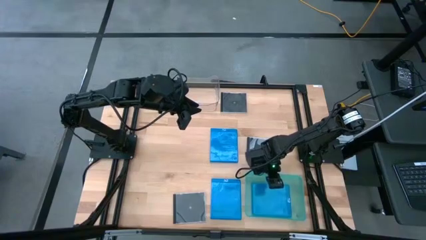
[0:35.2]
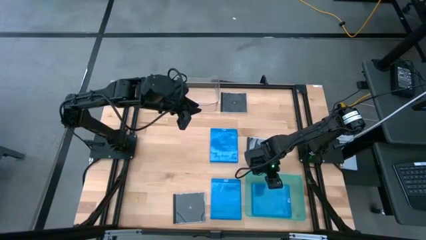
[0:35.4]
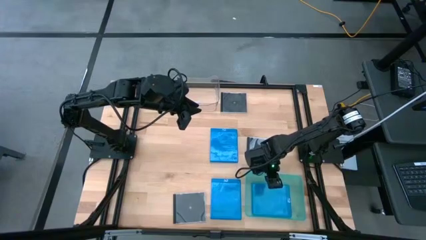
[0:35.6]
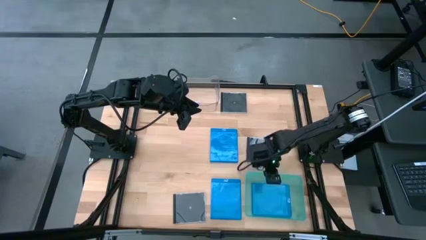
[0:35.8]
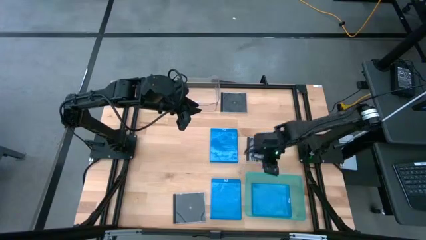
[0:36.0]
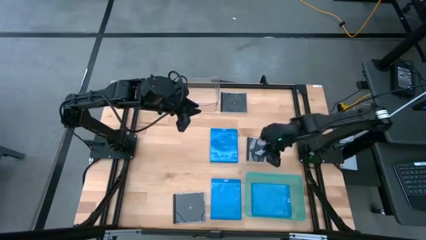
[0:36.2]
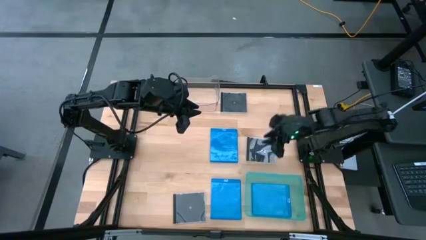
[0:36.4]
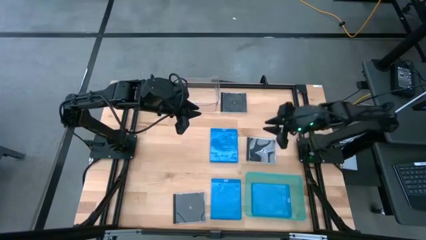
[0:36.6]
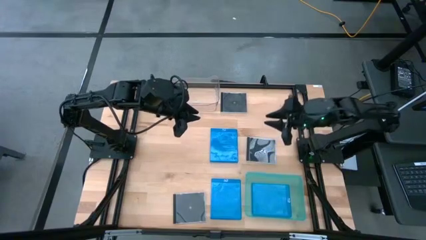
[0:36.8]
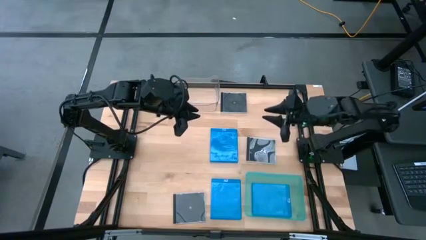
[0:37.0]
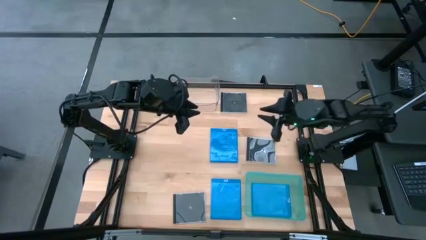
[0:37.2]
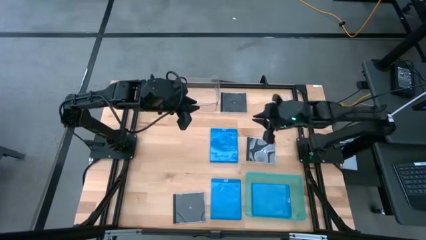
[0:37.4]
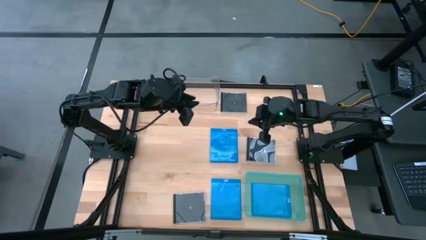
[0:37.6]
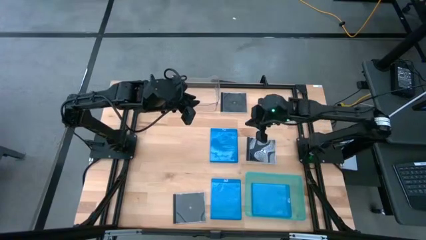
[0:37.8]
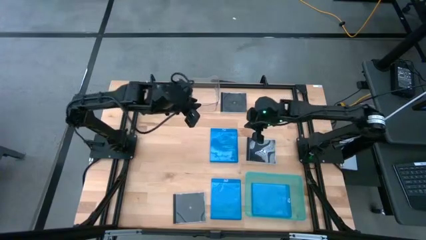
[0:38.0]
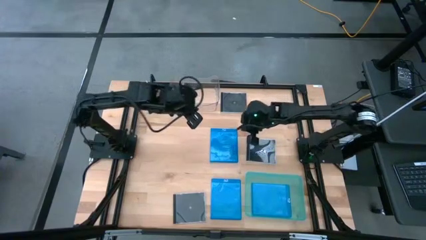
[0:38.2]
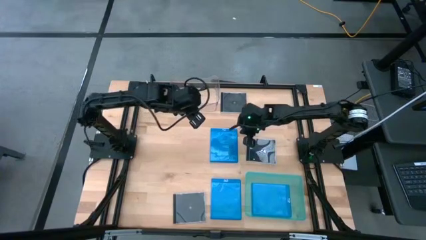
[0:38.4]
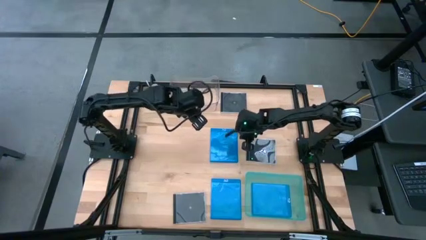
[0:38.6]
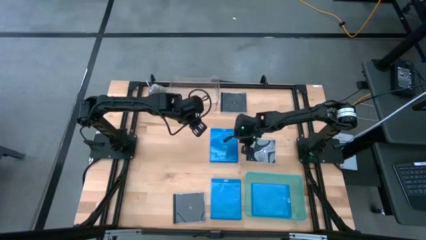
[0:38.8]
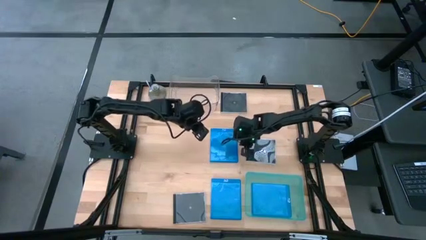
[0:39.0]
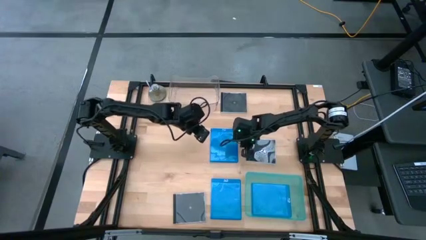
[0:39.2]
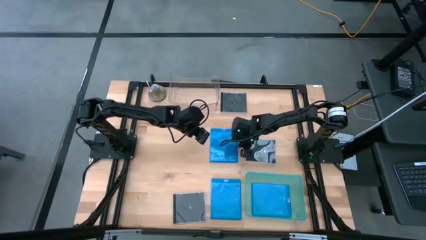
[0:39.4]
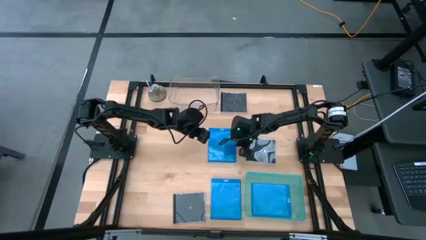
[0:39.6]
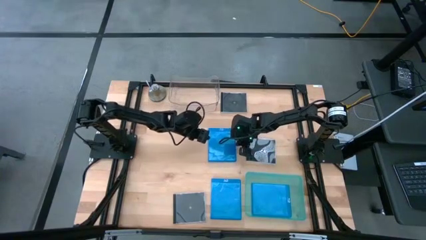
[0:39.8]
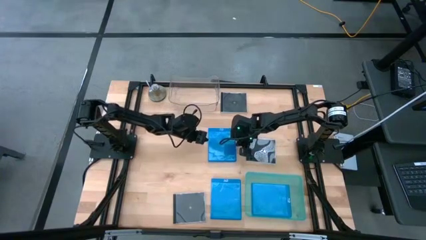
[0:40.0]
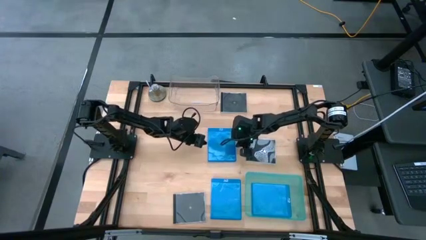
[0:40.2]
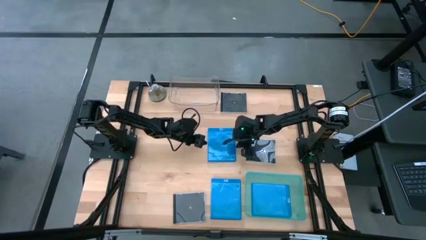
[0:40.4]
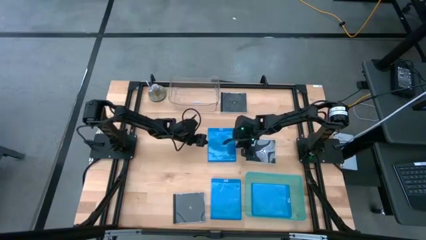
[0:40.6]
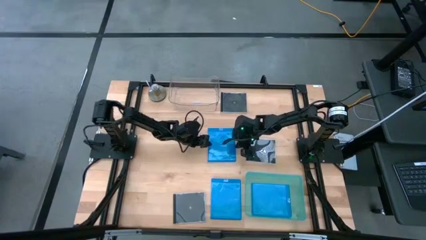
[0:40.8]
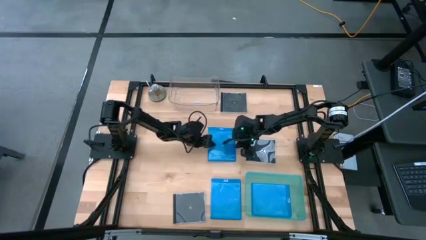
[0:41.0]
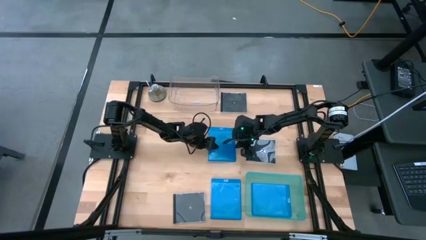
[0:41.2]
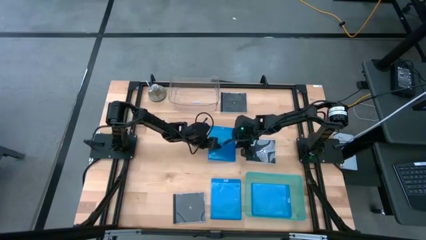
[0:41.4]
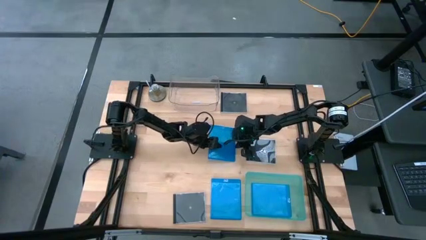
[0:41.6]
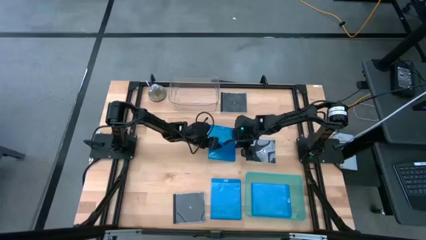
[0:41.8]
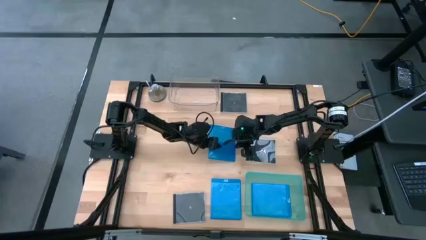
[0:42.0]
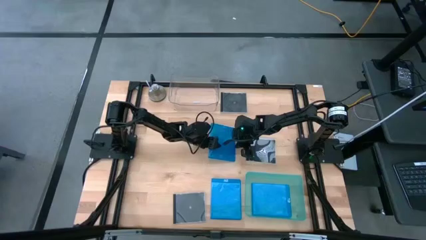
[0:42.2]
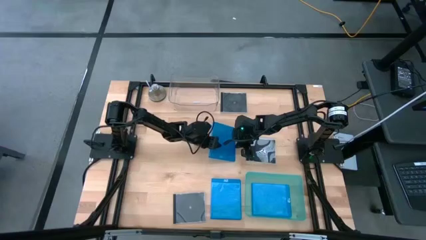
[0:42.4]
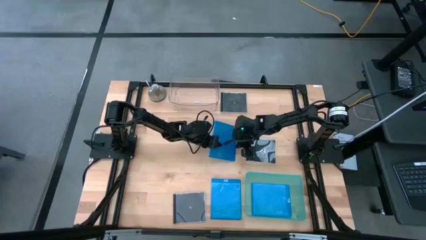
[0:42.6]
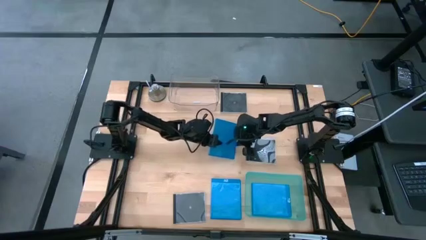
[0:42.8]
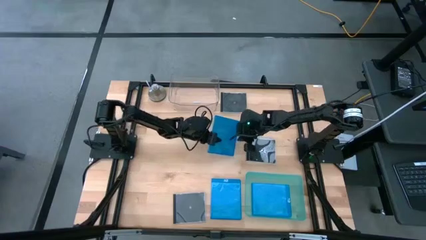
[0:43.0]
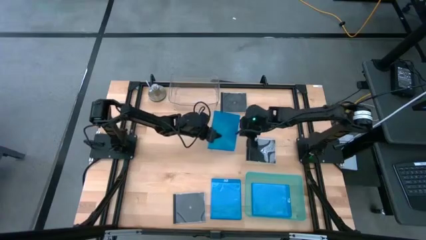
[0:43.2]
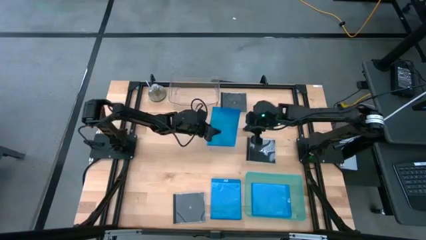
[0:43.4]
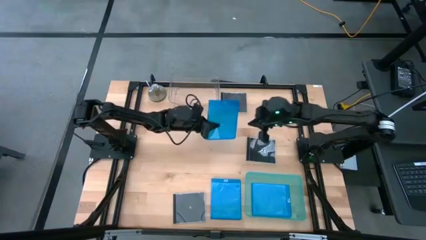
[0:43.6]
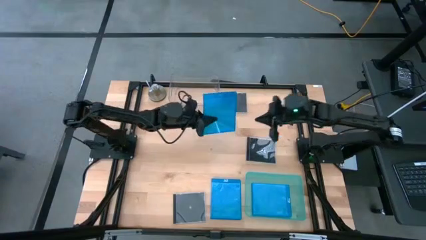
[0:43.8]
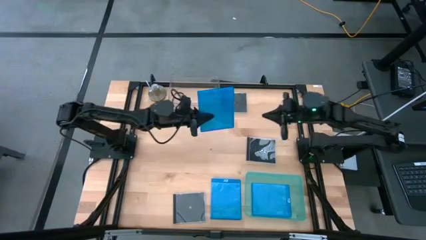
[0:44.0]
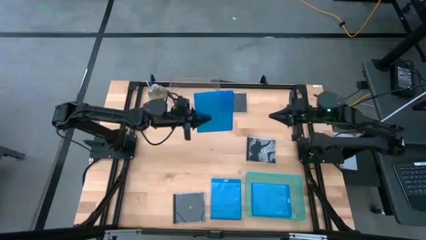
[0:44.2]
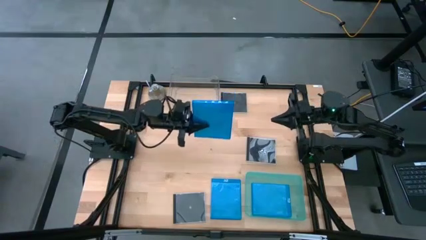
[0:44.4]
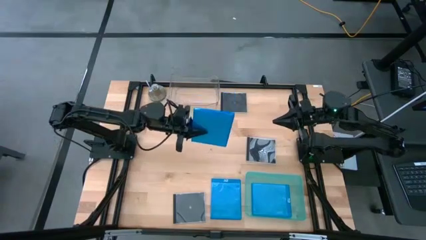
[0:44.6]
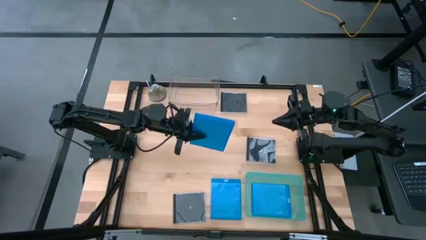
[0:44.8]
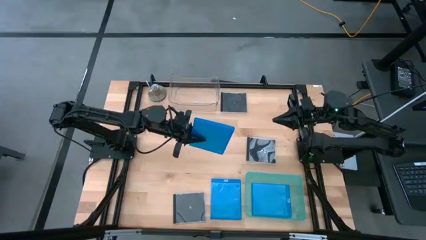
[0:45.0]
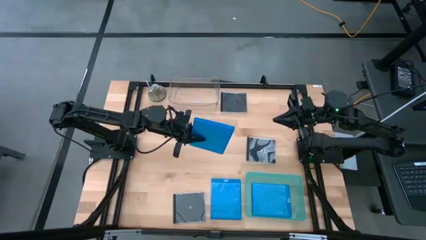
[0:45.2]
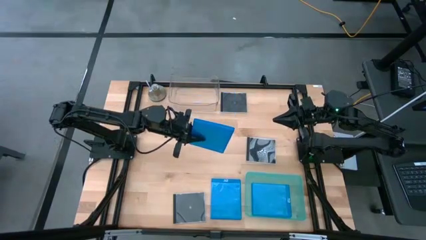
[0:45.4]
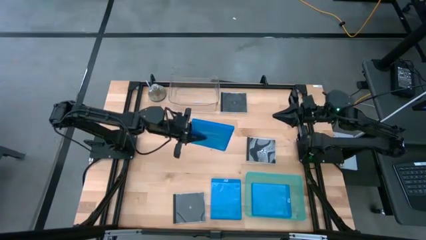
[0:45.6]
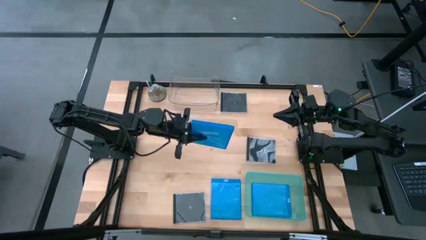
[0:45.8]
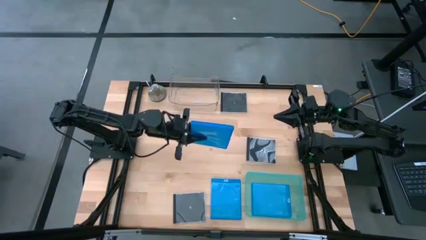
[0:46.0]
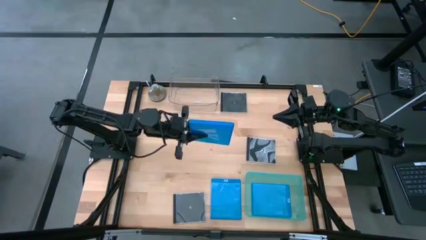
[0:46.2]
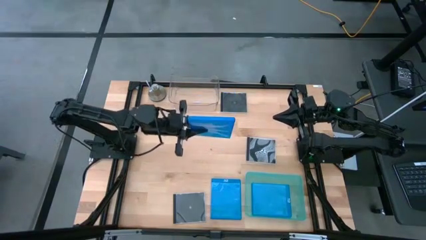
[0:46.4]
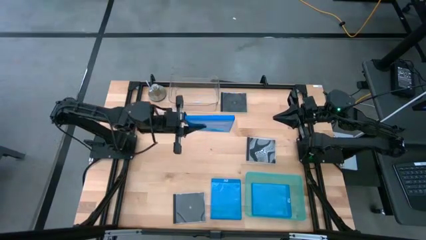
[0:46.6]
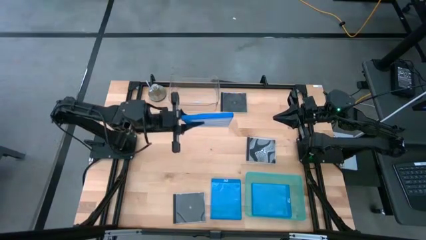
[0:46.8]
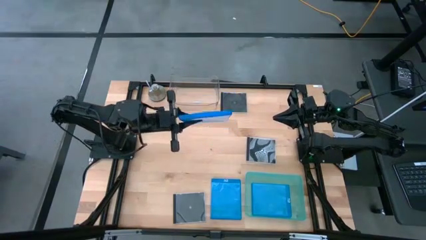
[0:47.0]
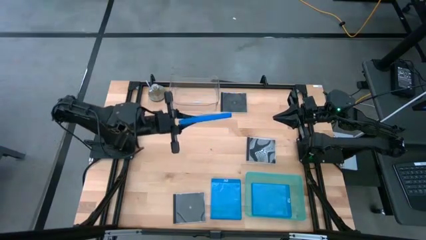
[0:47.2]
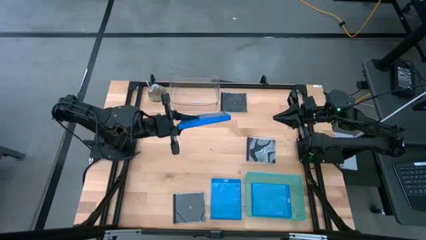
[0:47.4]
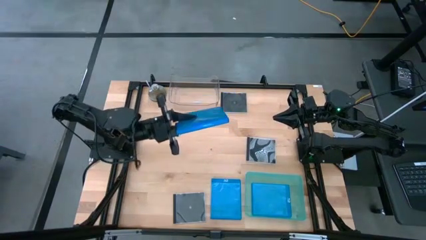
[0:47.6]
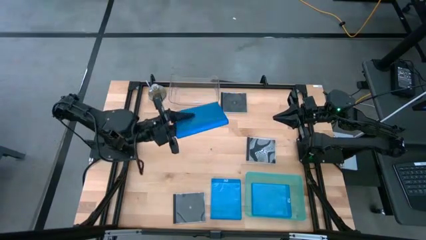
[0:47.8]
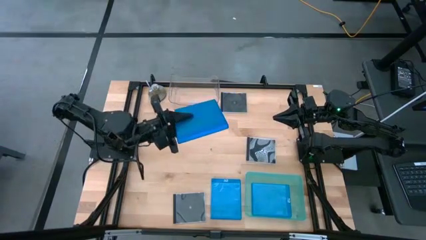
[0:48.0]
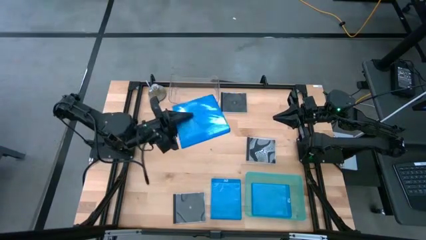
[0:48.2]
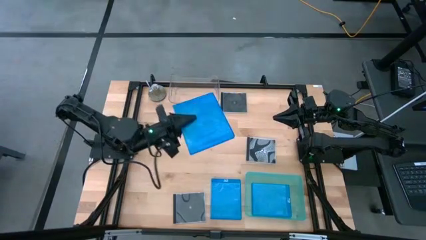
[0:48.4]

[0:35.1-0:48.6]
Task: Pick & place jewel cases by type
Put the top blue cd case into the green bin
